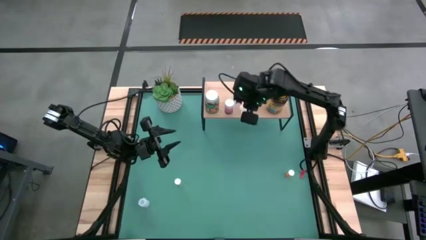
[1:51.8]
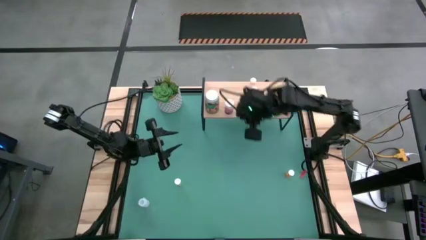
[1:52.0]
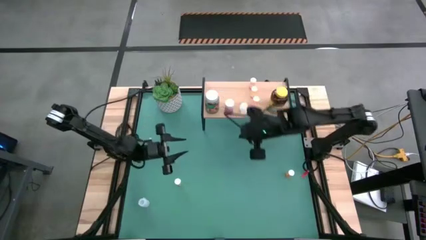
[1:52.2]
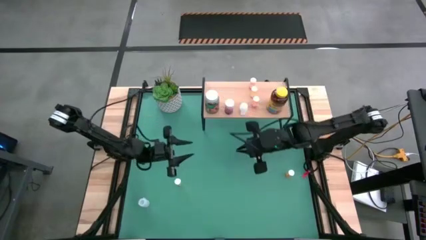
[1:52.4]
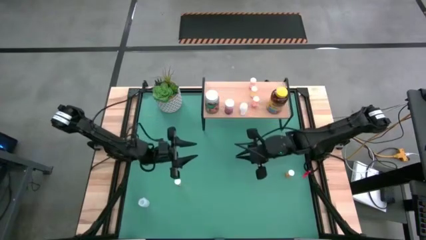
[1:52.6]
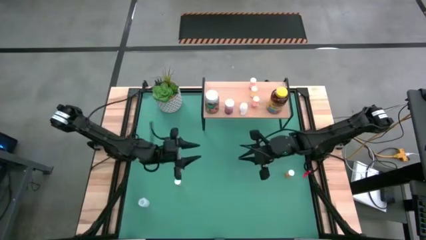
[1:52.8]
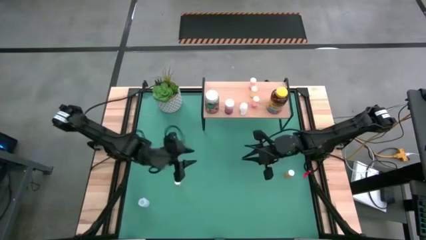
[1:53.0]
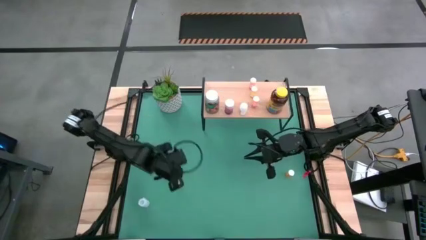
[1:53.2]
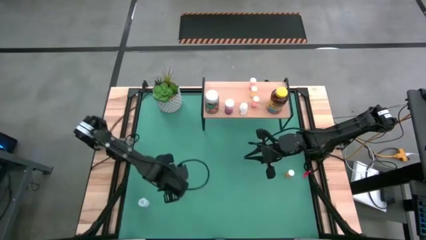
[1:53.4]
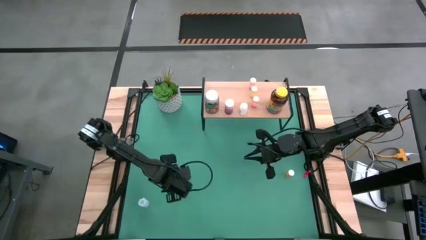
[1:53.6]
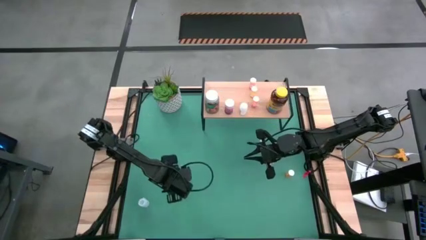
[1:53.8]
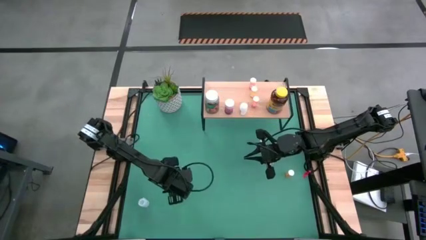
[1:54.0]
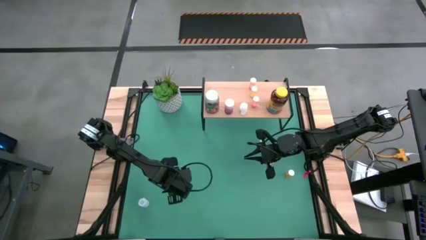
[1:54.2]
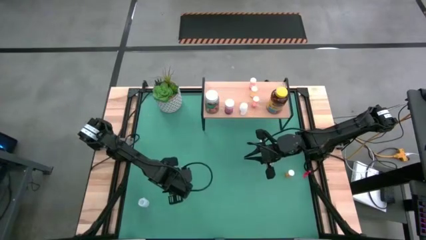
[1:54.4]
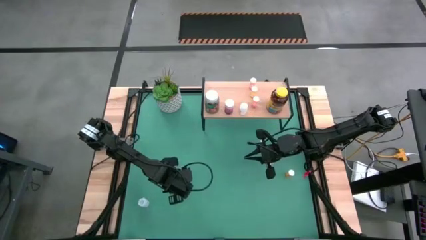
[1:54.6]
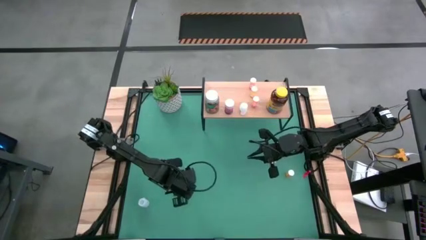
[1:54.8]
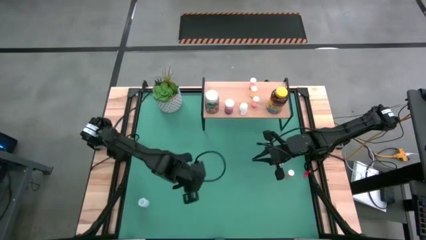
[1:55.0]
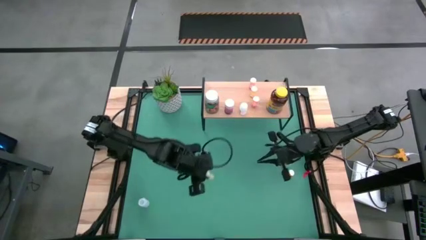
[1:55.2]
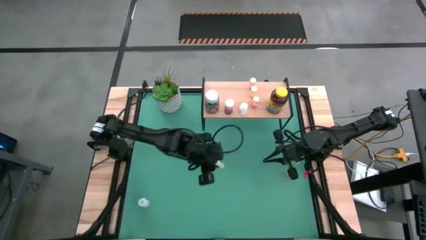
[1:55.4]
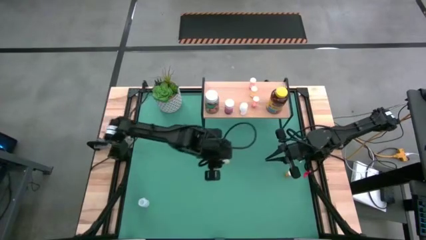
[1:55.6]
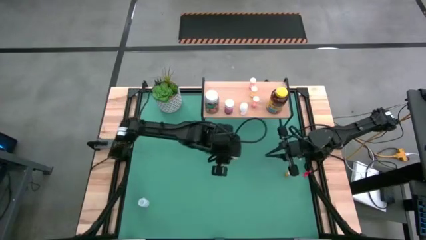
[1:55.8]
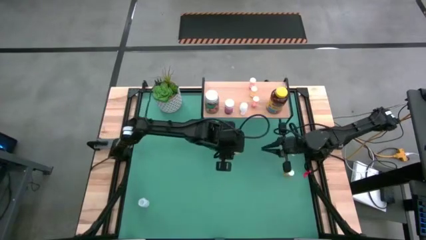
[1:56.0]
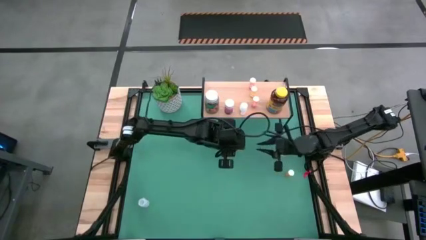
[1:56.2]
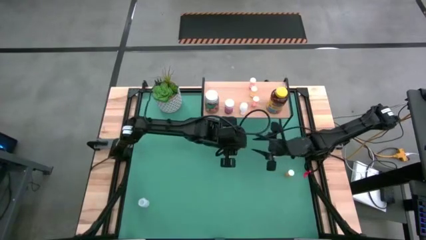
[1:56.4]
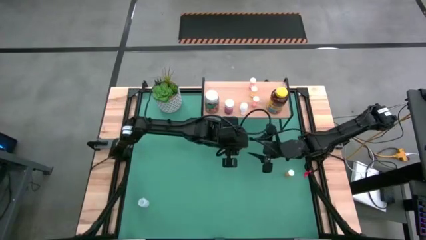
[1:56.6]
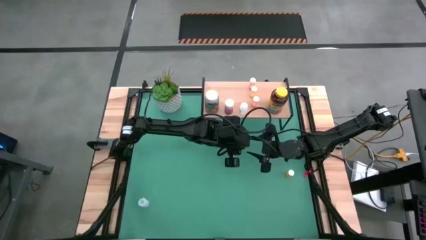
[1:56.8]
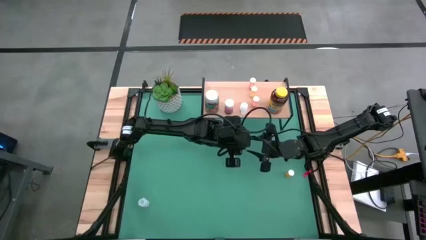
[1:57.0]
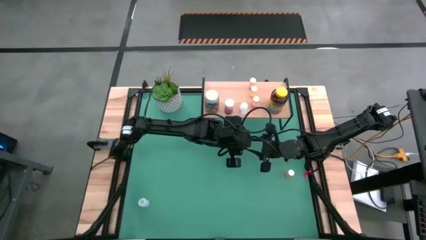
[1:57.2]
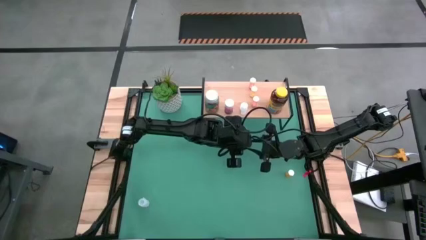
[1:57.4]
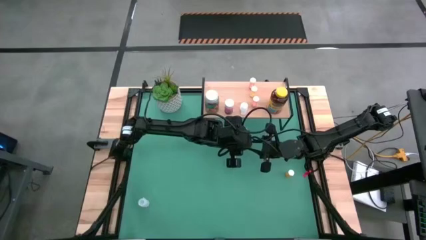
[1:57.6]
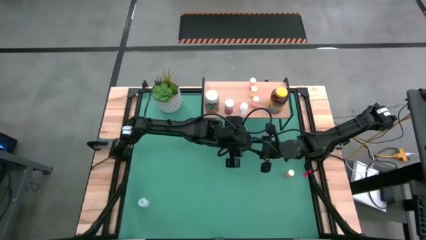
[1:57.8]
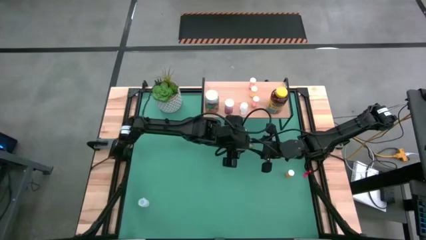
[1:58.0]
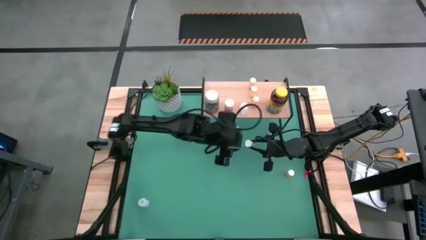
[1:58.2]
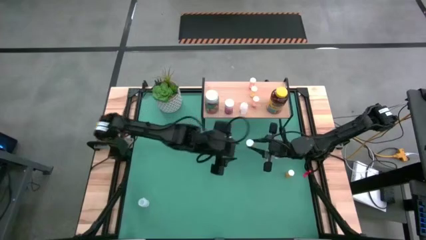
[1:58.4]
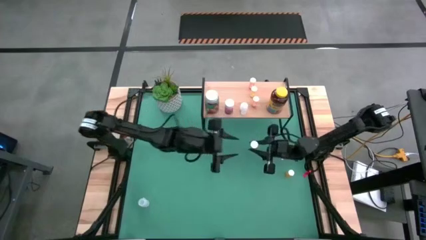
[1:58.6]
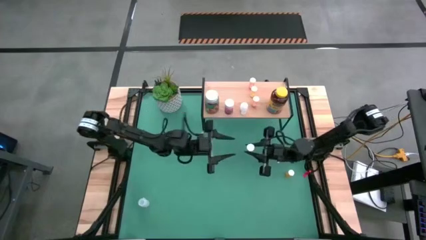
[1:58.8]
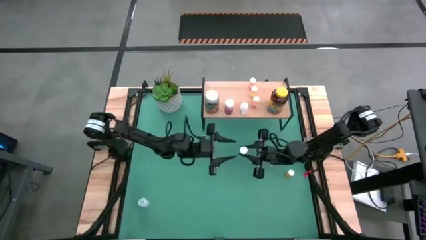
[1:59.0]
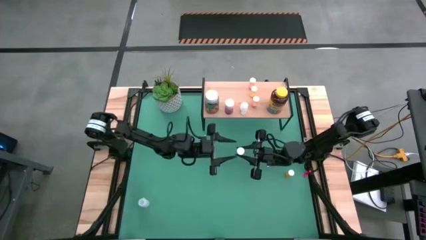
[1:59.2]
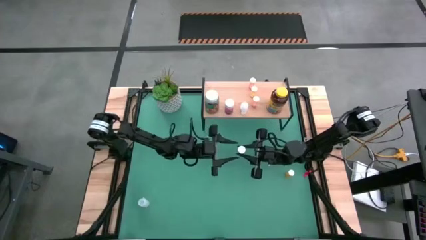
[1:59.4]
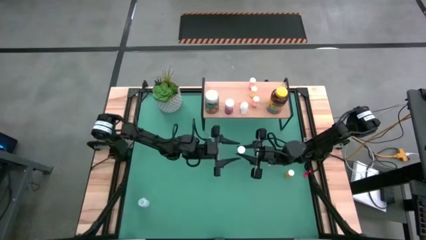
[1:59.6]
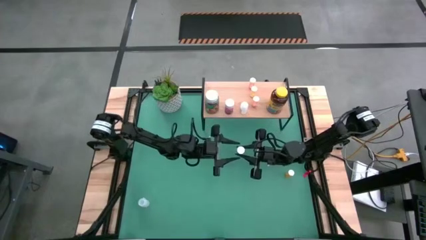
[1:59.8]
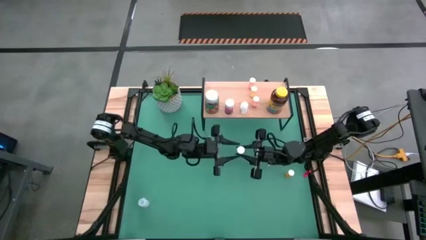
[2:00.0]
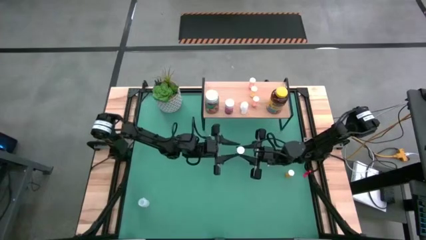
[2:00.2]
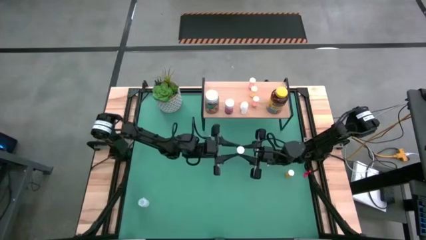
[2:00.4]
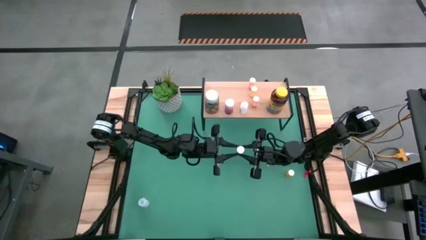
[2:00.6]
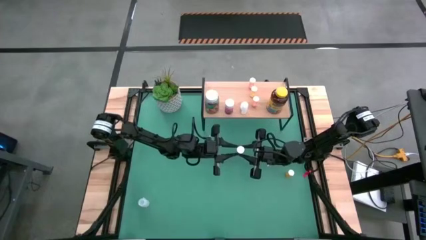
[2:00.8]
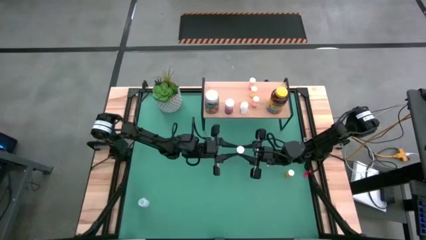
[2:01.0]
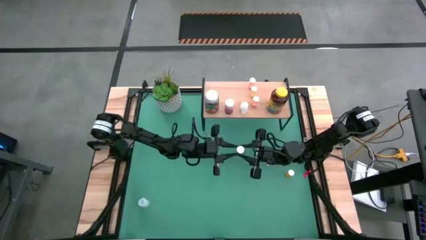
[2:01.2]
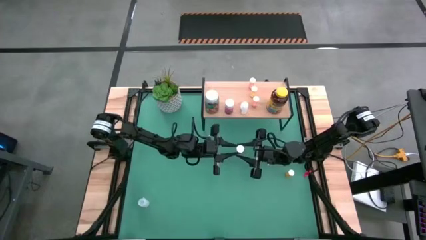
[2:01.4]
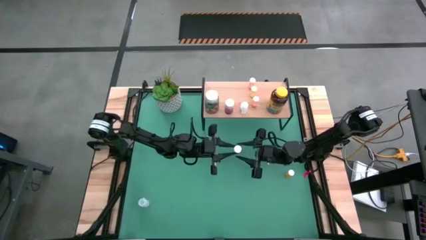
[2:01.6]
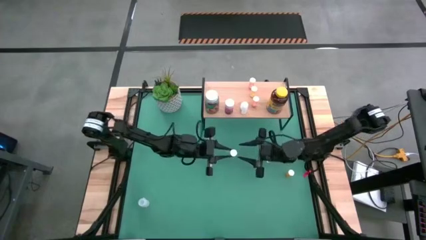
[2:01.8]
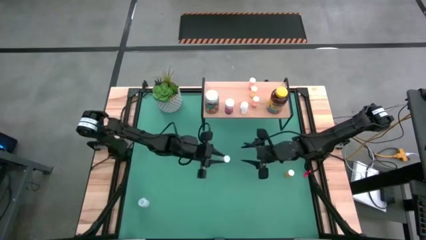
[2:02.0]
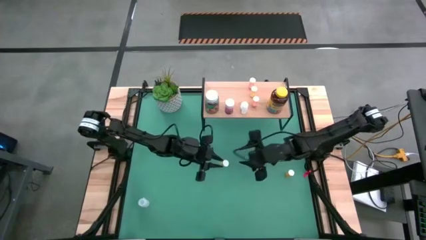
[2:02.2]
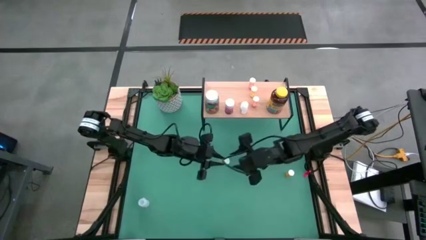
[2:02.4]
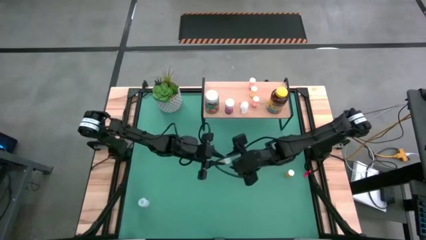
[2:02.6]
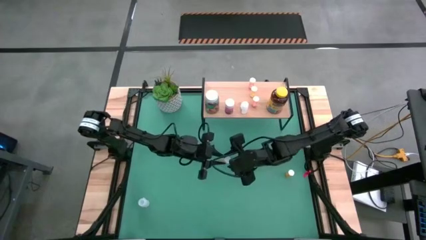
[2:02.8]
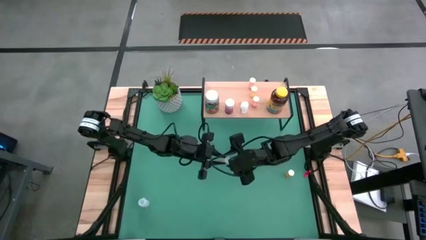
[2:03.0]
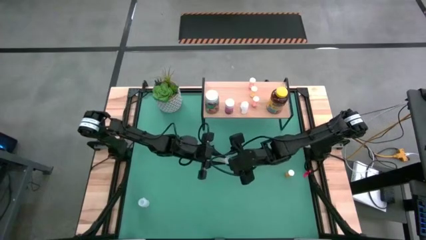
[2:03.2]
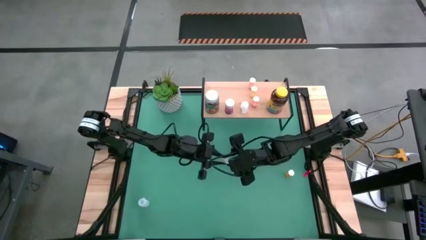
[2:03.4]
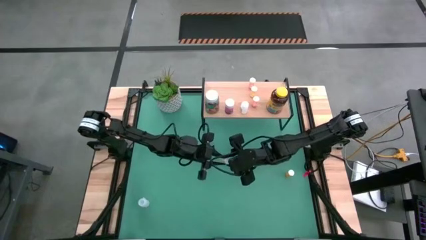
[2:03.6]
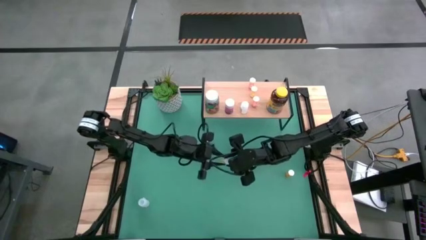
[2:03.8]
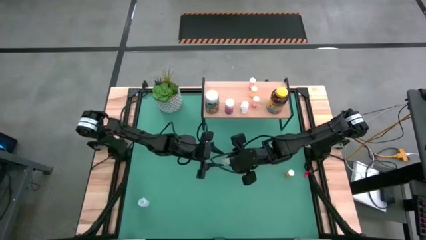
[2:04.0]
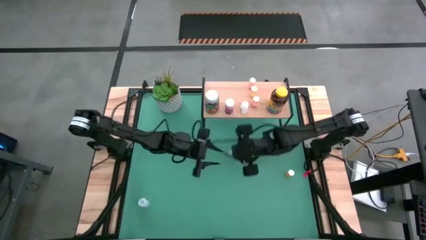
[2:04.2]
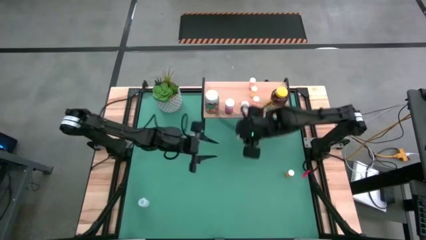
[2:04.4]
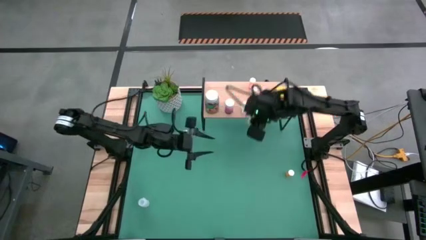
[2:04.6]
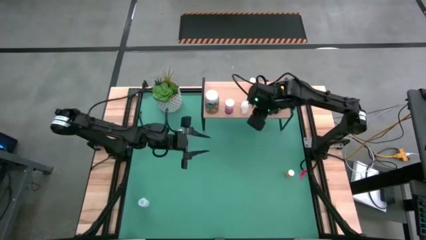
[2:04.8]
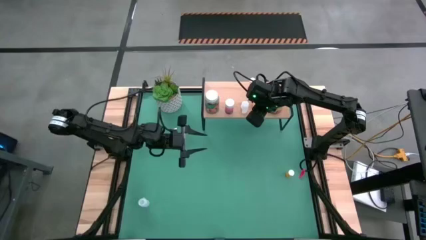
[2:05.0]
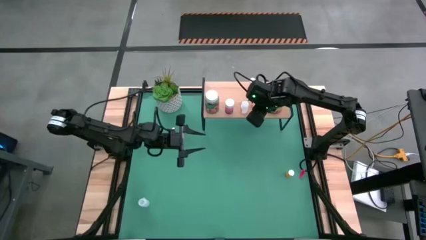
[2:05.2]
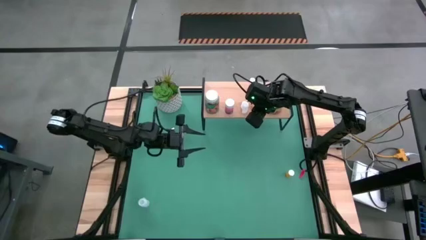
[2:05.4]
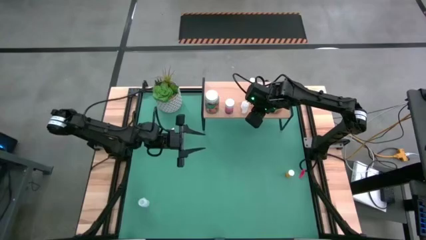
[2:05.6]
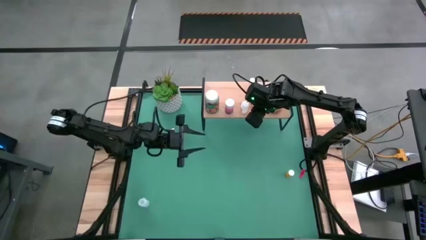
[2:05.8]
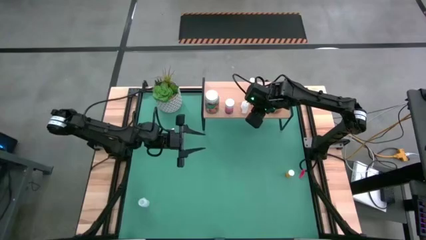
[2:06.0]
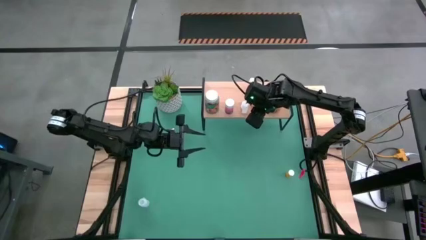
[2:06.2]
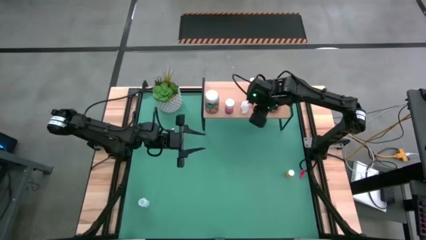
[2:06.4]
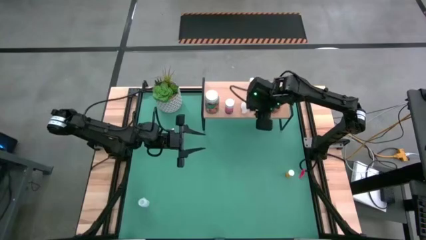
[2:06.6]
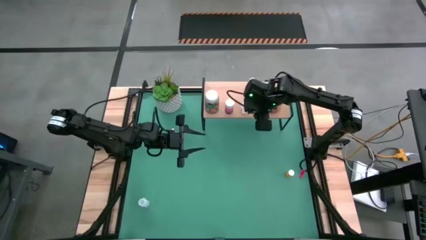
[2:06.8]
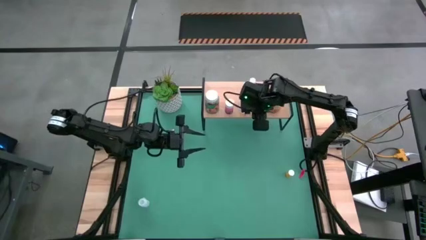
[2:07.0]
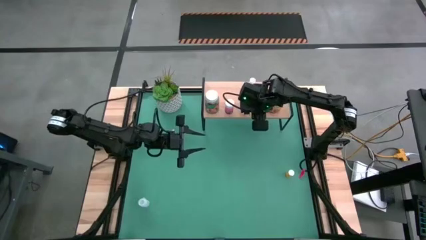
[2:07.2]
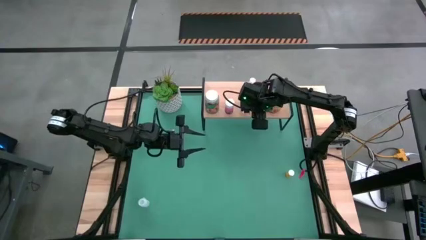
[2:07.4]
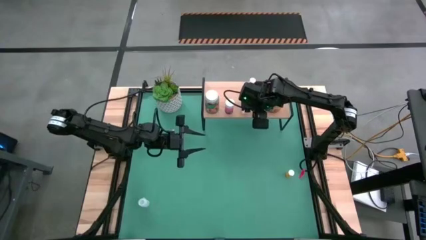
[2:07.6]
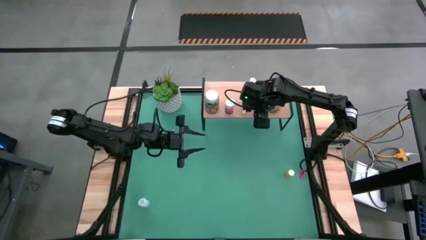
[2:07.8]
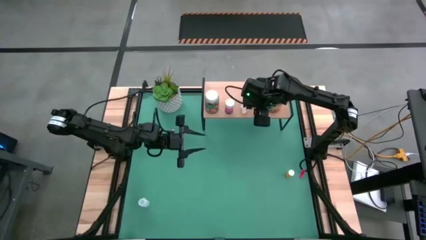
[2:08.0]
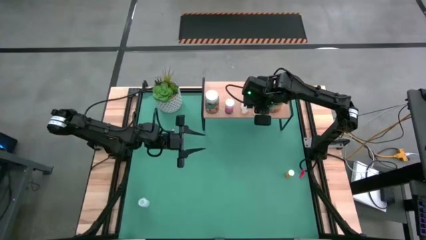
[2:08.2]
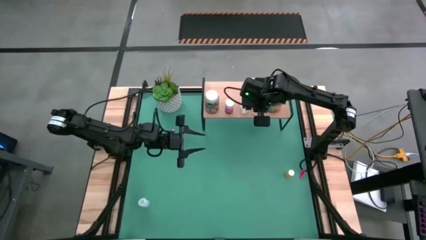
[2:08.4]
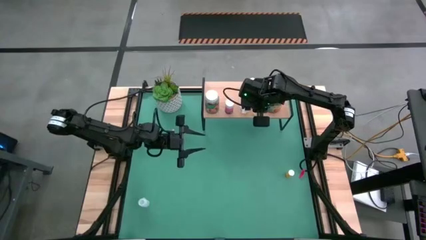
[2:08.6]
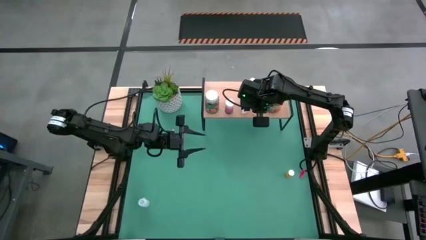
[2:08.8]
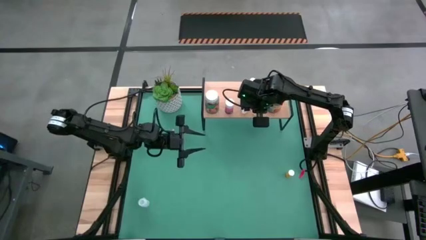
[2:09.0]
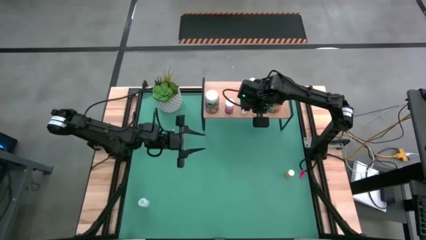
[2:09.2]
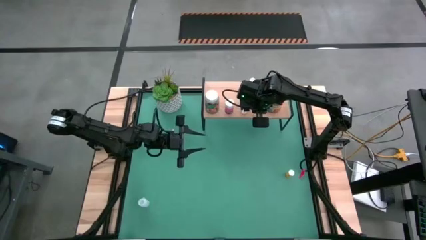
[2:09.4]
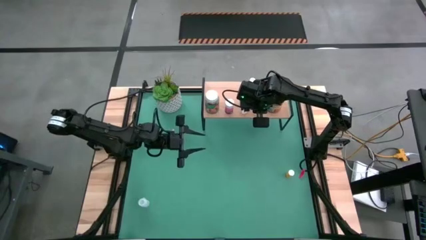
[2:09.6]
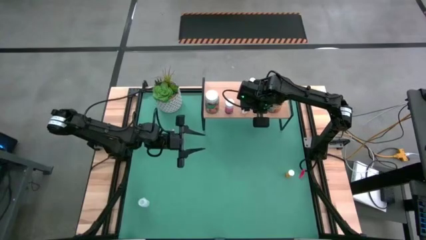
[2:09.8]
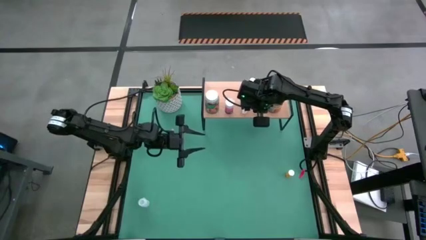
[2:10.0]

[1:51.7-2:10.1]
Task: Pick and place medicine bottles onto shelf by color
Put the small yellow medicine bottle on the shelf
